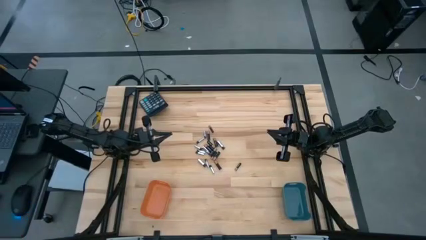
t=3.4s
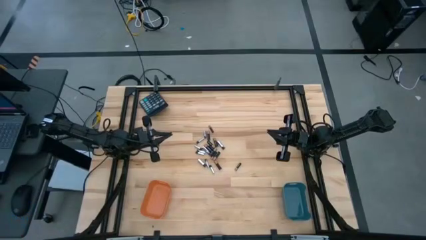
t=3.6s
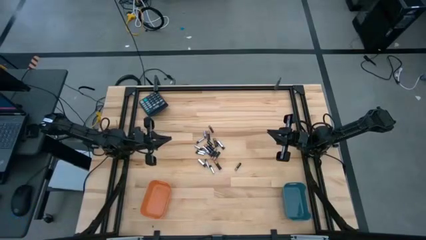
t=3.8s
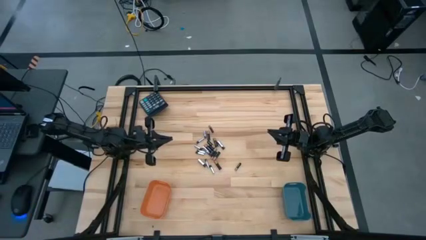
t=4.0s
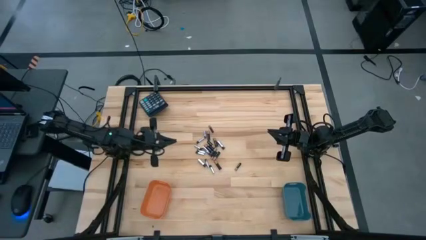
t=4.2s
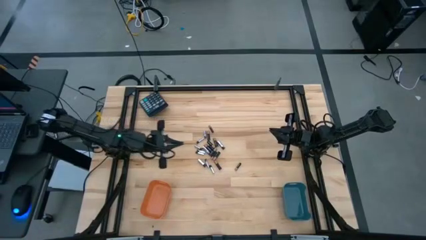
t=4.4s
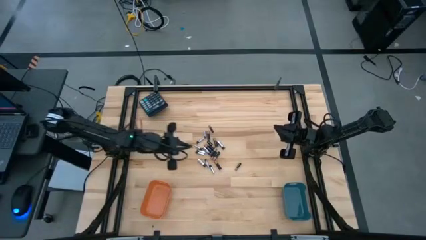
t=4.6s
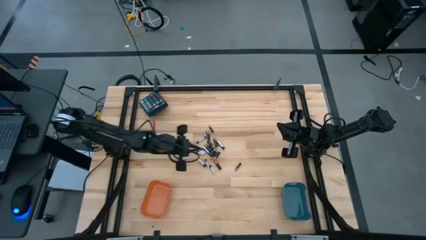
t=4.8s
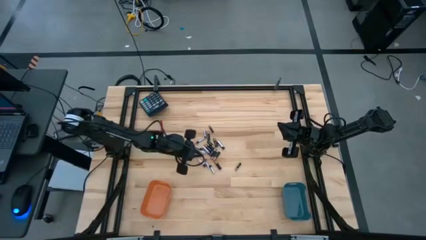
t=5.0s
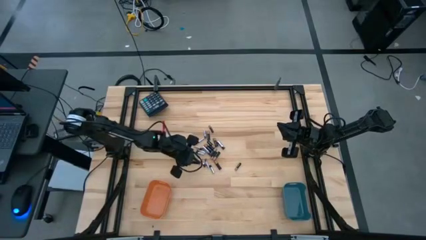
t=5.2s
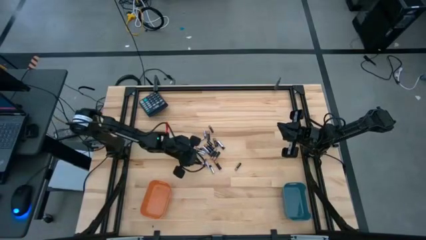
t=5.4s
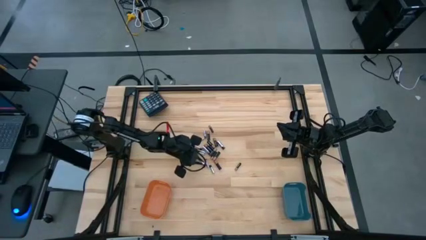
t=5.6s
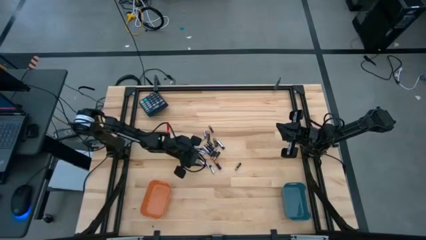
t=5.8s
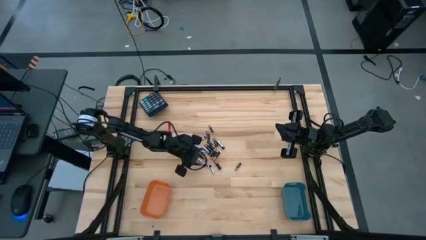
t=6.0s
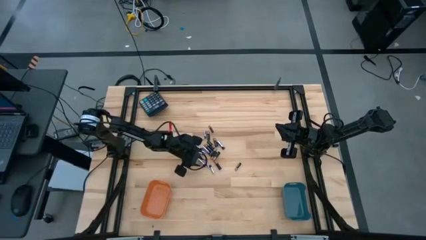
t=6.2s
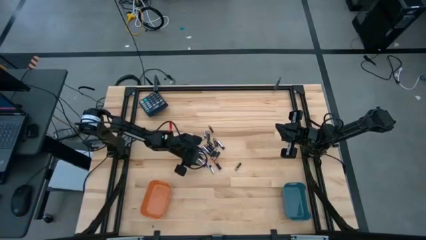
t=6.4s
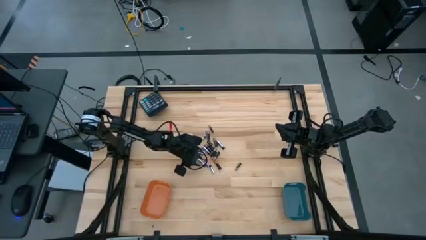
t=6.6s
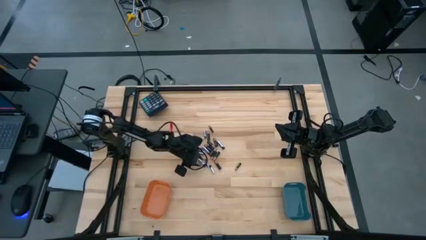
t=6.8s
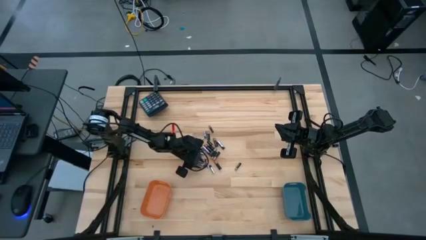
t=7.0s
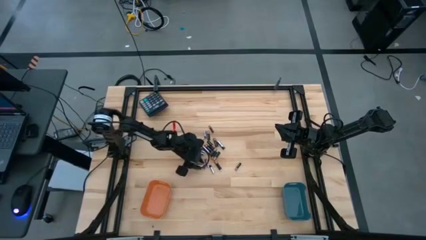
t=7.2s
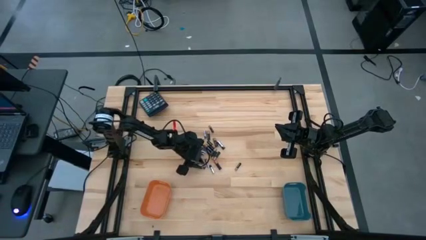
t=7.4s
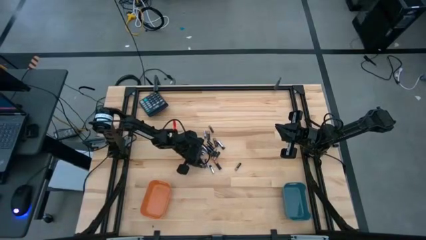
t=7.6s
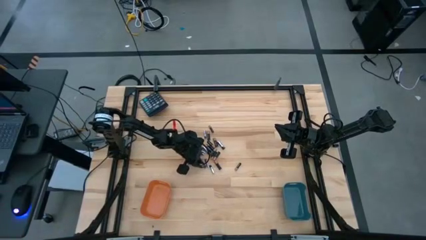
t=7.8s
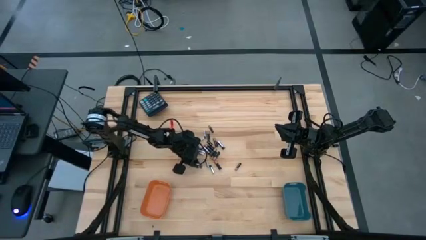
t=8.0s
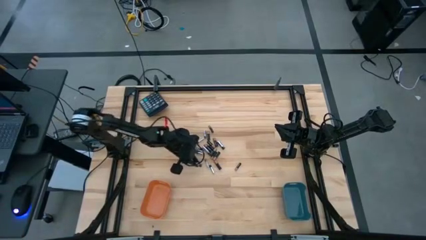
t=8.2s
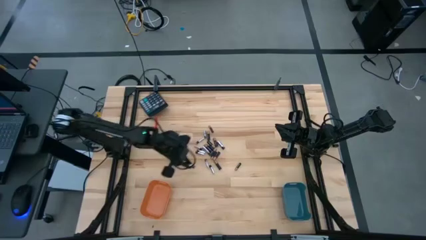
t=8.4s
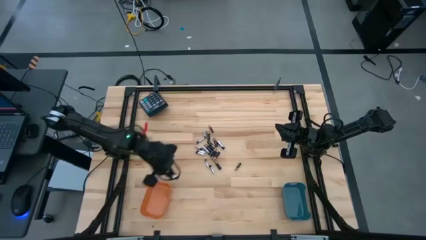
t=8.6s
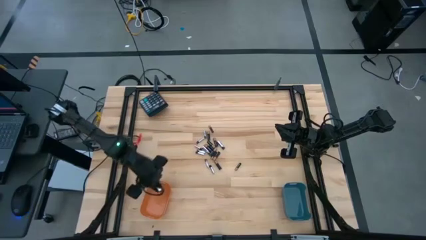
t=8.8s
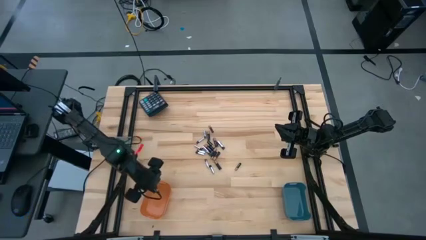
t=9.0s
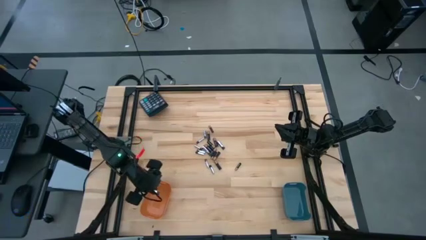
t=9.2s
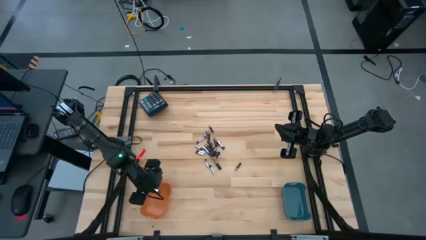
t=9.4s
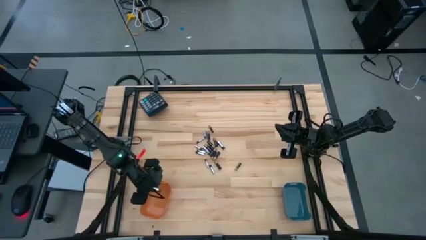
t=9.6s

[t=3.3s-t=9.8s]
Task: Sort batteries
Put the silver battery into the orange bin

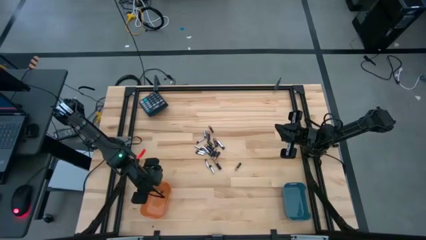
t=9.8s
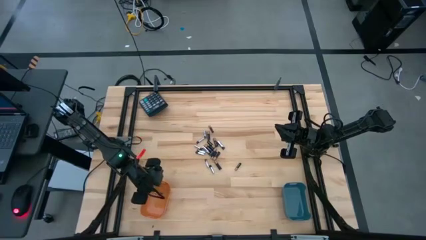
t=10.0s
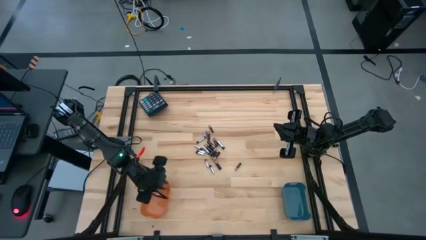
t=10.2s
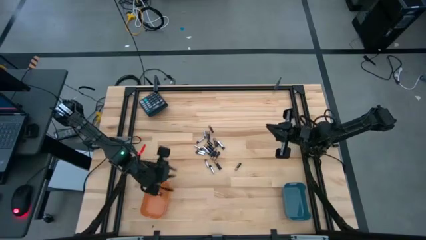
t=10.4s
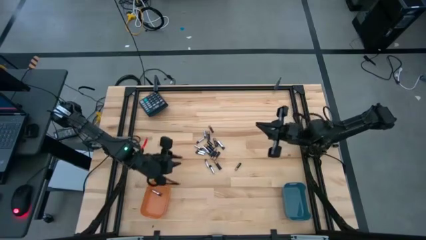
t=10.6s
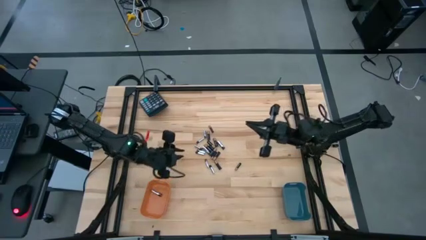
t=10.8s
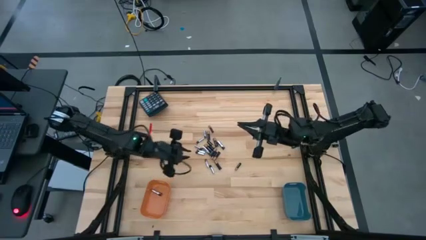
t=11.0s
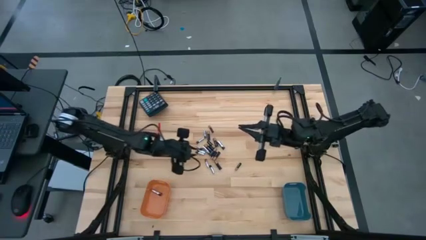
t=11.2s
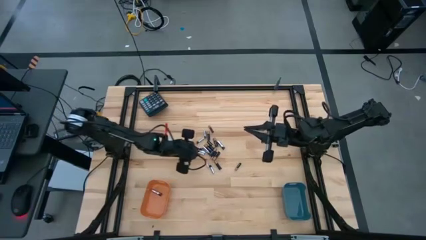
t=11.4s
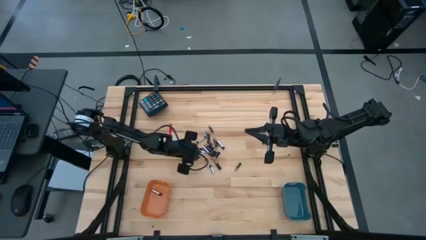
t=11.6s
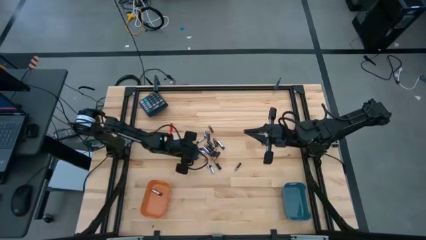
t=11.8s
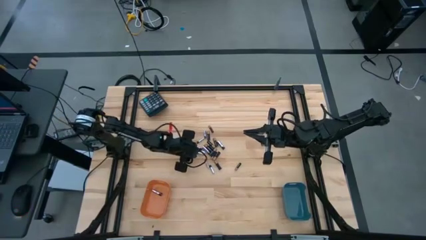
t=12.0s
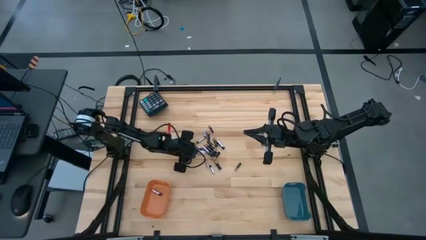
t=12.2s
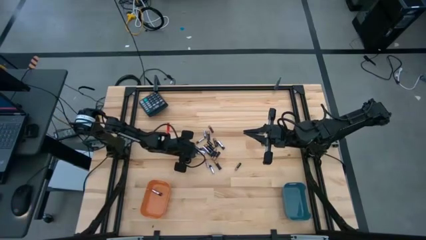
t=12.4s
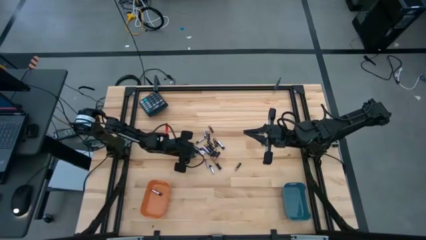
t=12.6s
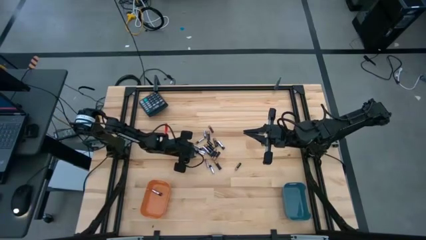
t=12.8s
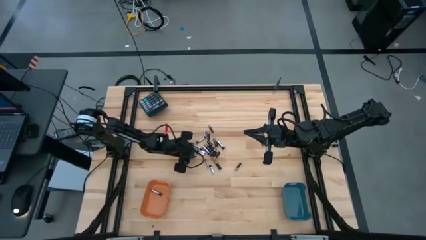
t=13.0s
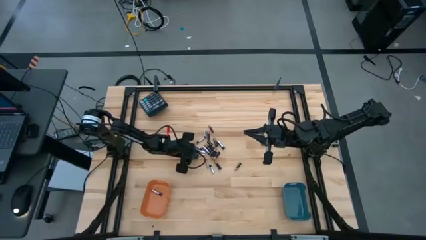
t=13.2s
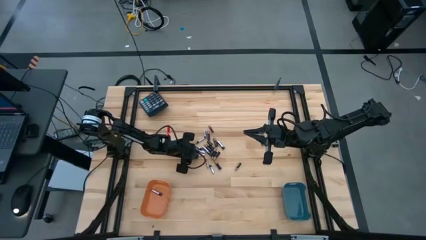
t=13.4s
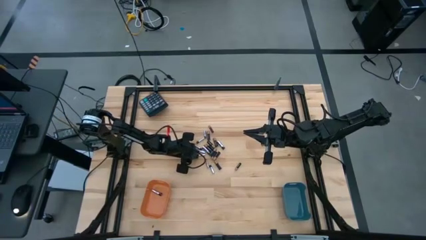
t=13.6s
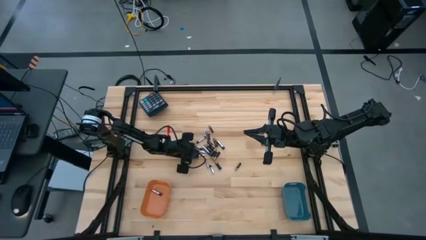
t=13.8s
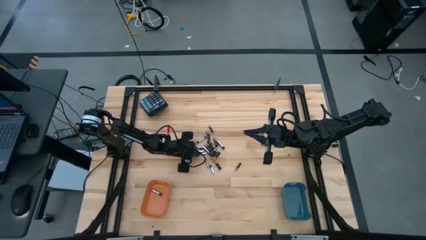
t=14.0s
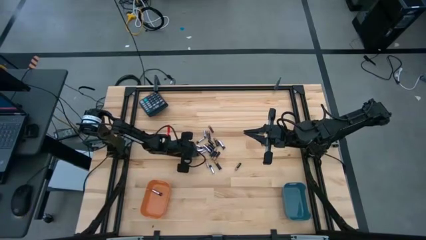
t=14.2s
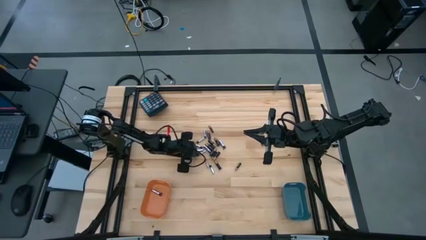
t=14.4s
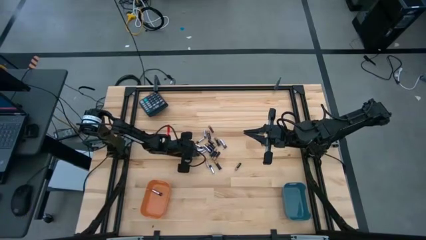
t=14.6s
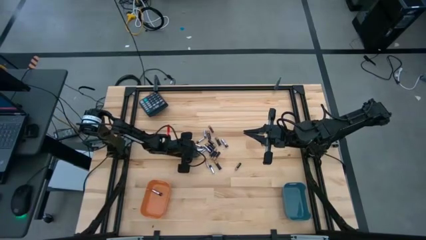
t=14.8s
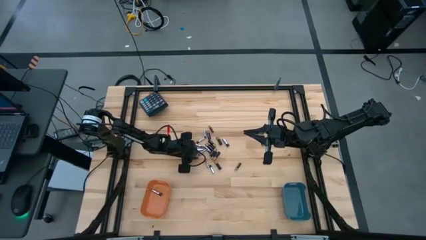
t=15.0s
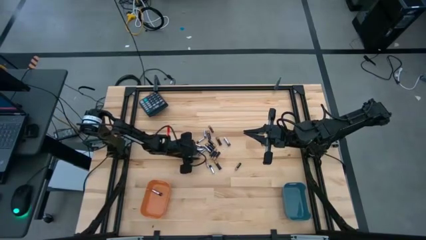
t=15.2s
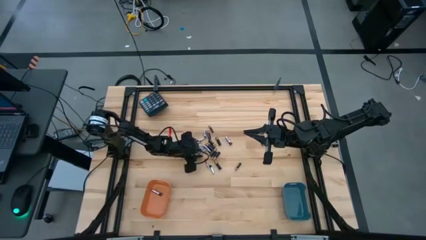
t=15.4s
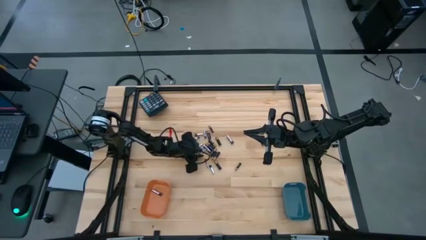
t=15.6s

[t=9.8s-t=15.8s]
Put the silver battery into the orange bin

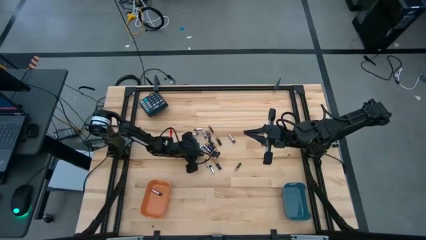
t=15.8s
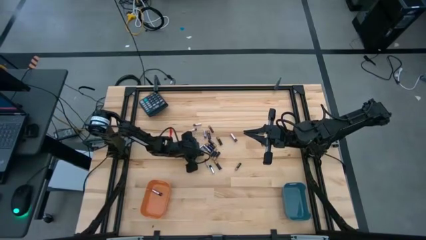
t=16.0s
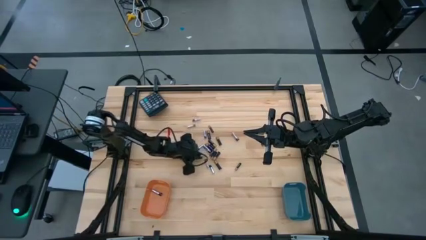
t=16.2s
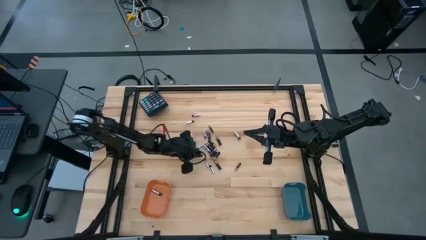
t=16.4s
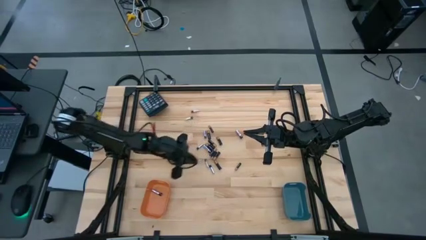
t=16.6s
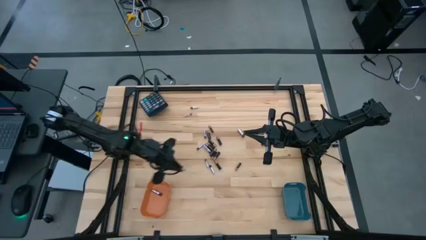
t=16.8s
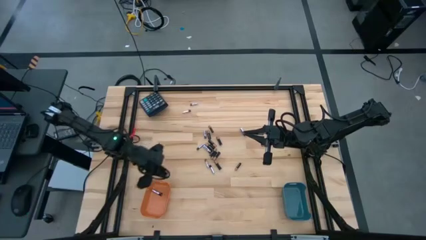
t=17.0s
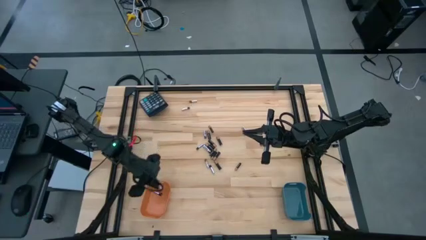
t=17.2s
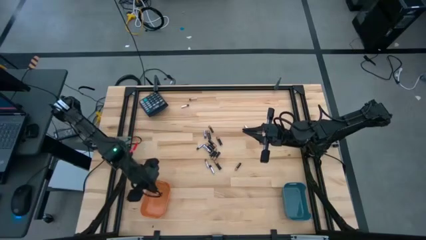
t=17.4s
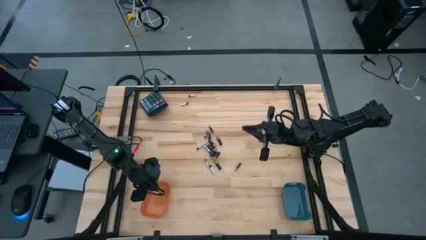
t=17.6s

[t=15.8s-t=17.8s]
Put the silver battery into the orange bin

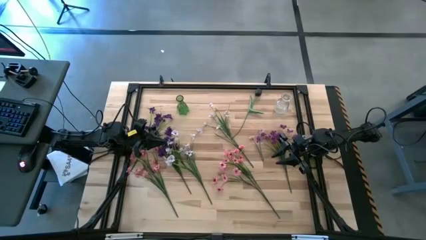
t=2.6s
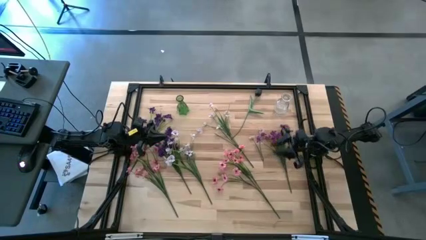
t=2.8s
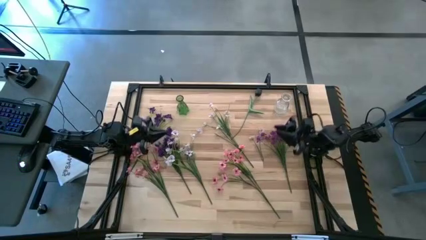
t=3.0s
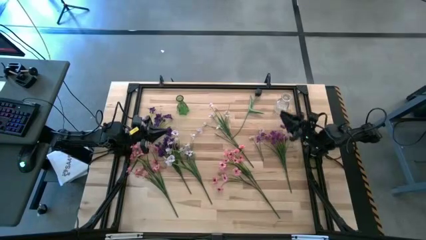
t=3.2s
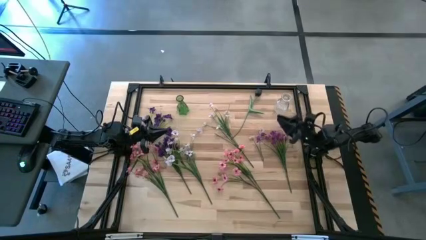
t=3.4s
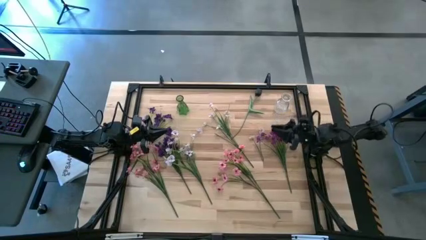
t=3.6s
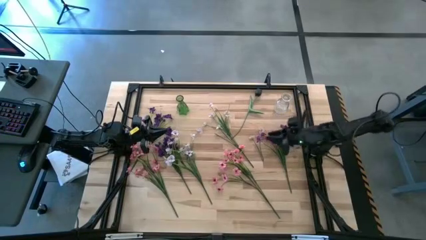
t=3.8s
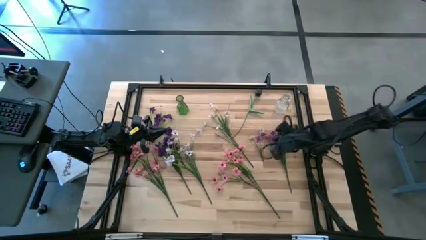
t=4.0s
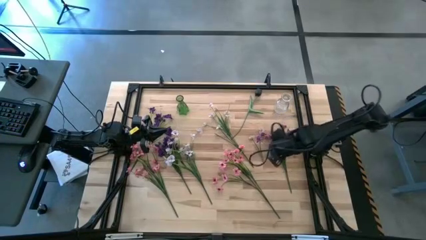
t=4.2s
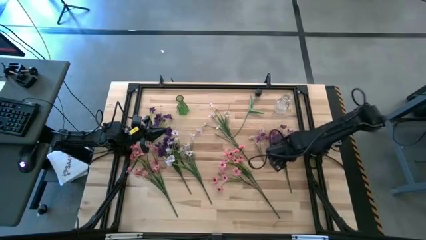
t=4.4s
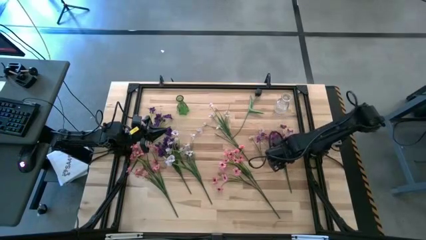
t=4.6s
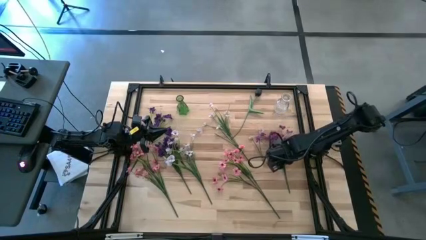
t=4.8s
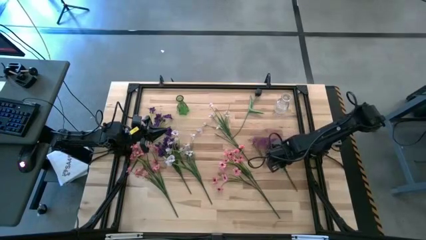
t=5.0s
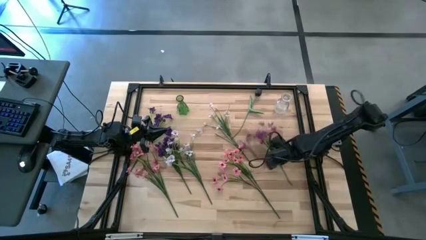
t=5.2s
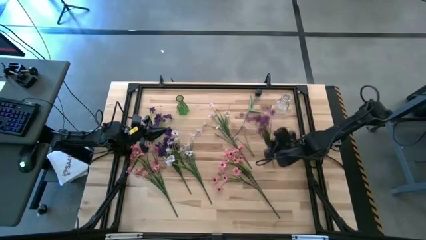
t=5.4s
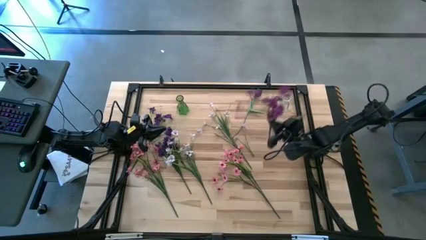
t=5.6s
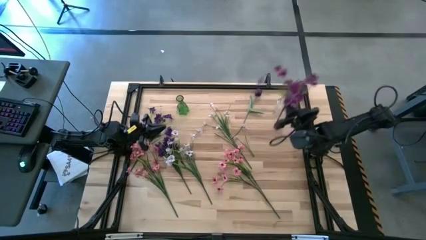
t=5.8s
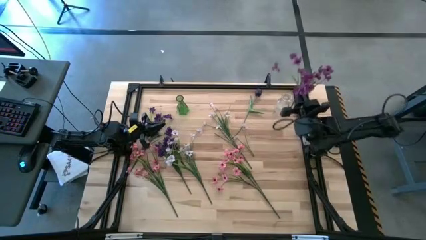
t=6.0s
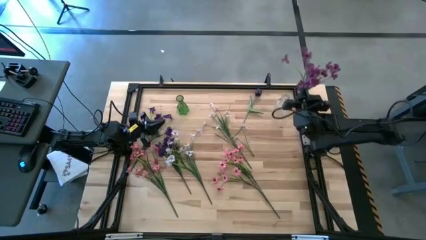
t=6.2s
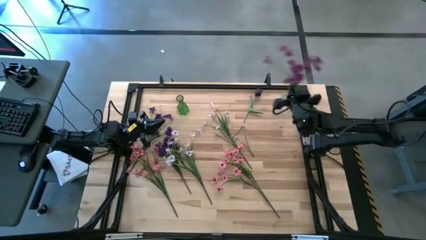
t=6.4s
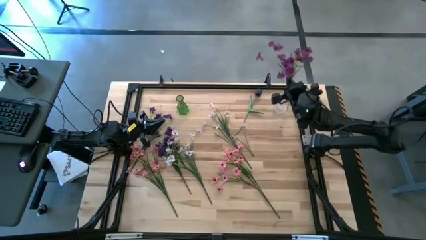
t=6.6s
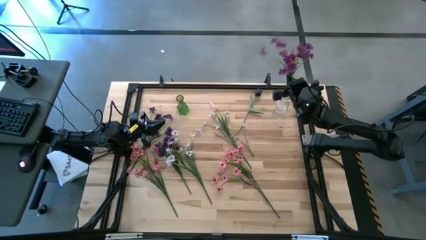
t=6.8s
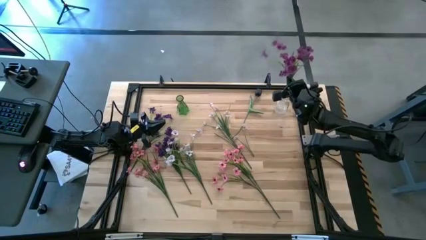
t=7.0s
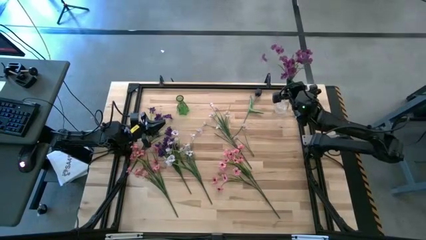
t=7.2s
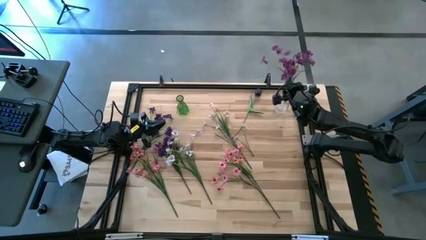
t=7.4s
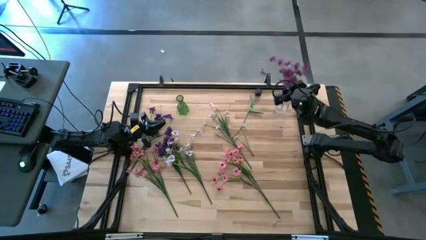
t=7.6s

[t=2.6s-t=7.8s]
Task: Sort flowers into vase by color
Put the middle right purple flowers into the transparent vase
